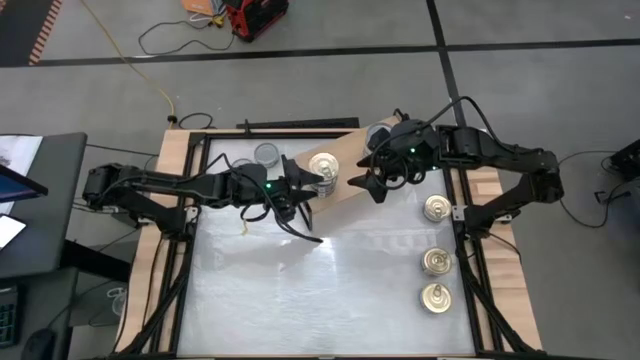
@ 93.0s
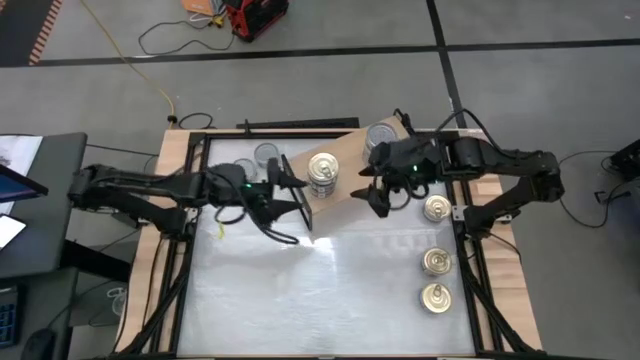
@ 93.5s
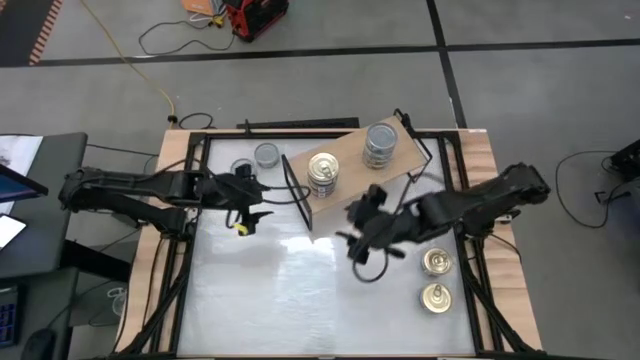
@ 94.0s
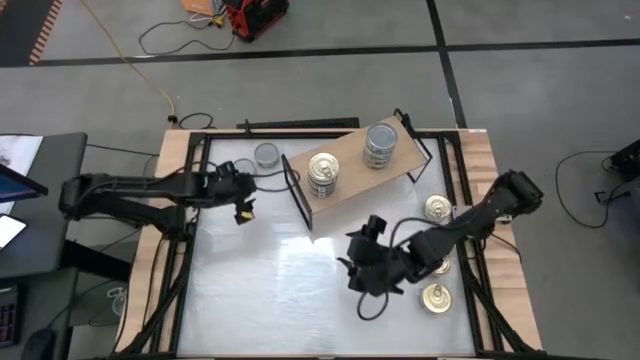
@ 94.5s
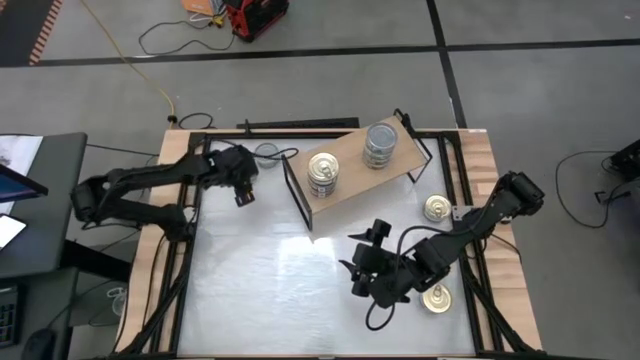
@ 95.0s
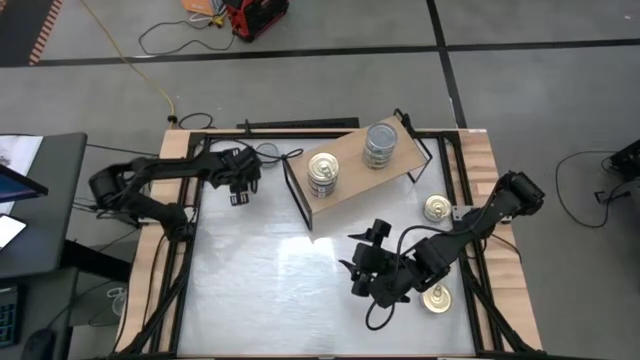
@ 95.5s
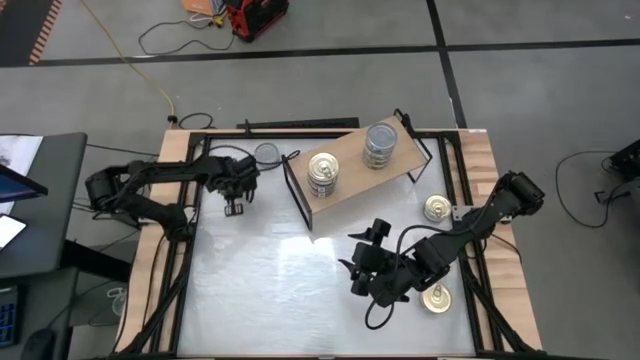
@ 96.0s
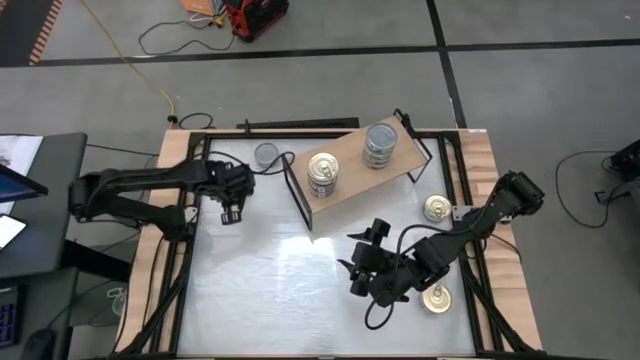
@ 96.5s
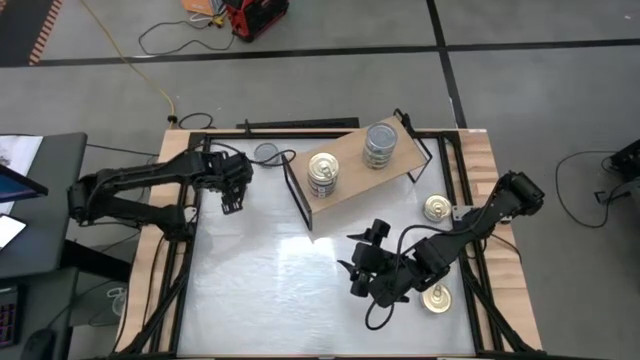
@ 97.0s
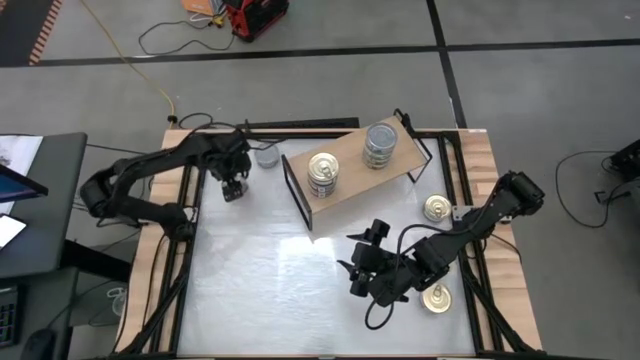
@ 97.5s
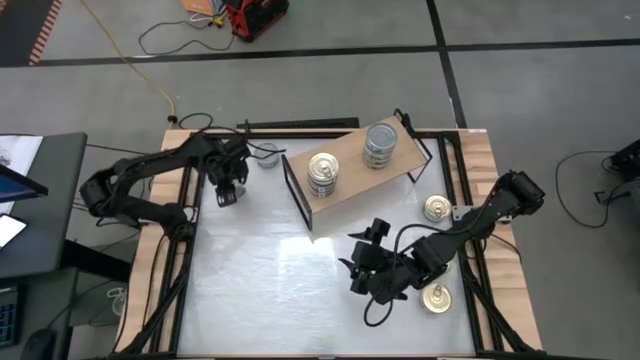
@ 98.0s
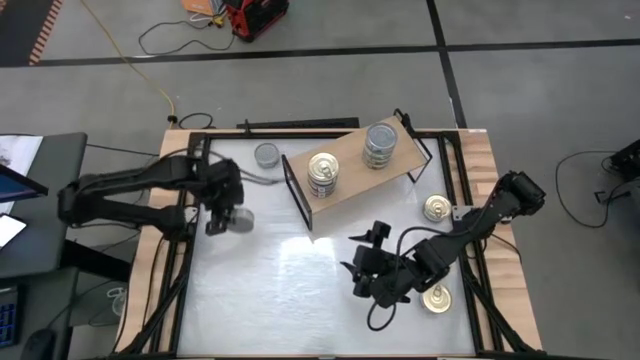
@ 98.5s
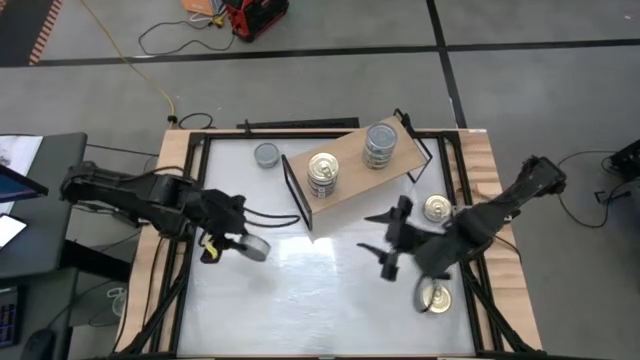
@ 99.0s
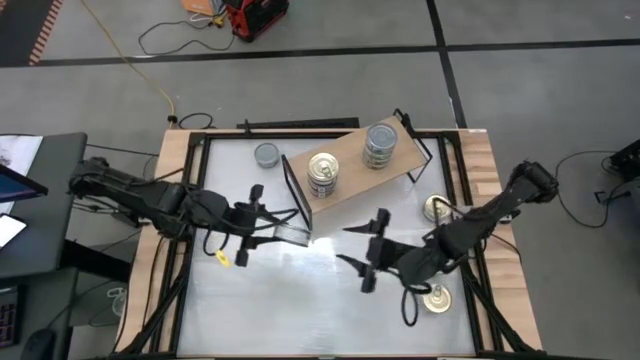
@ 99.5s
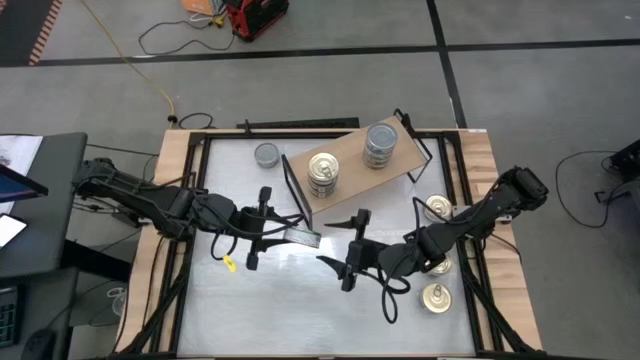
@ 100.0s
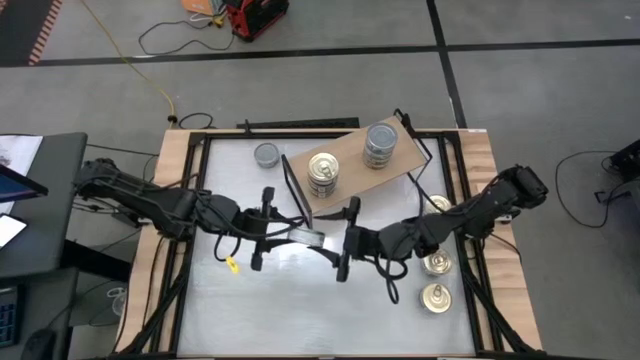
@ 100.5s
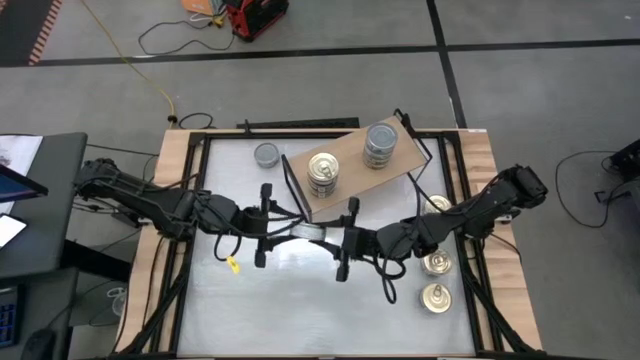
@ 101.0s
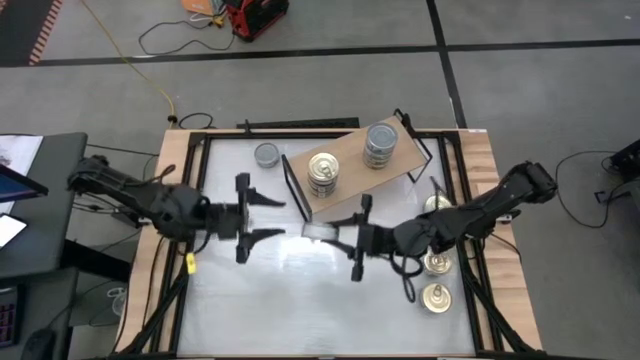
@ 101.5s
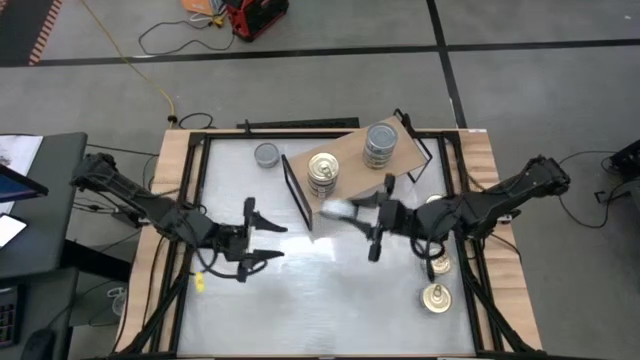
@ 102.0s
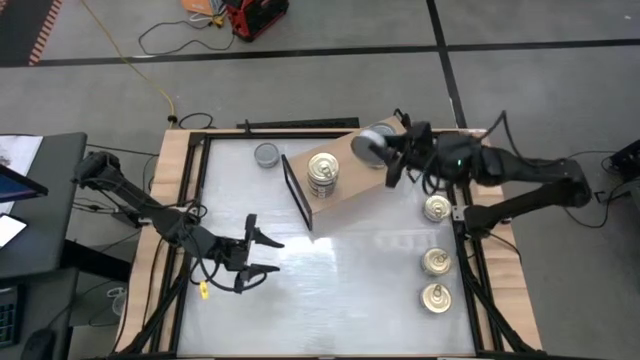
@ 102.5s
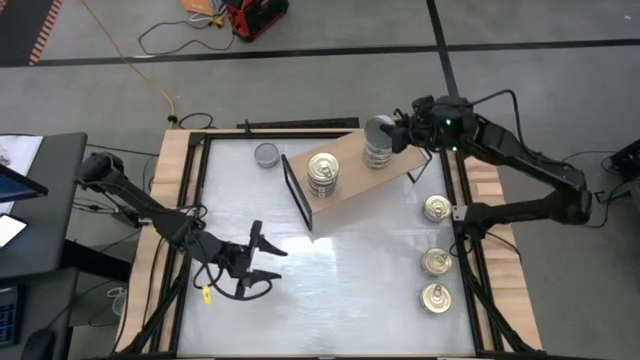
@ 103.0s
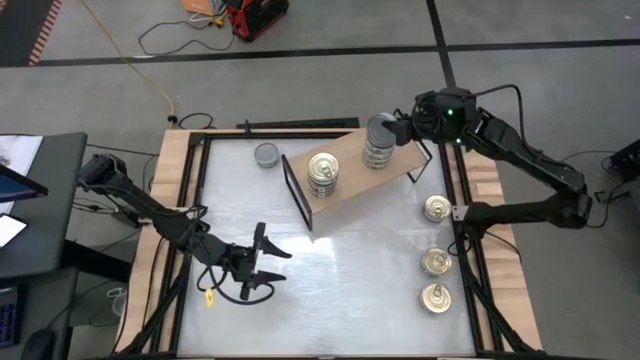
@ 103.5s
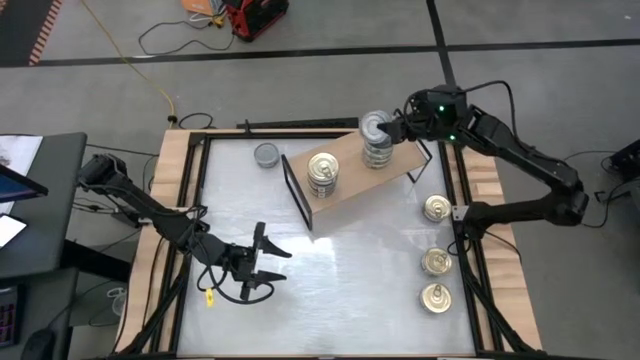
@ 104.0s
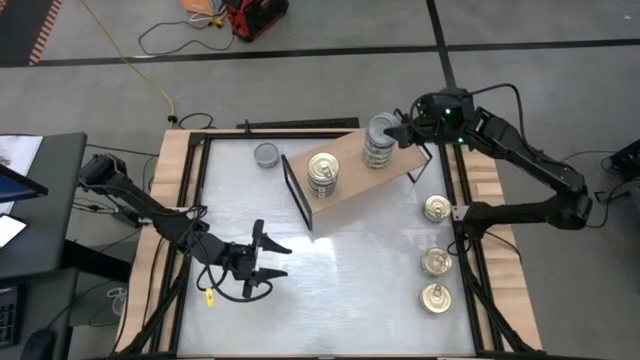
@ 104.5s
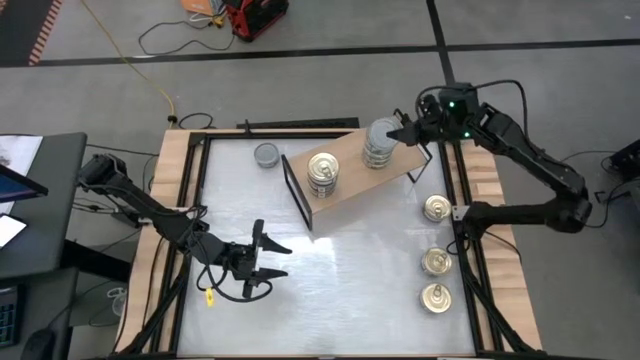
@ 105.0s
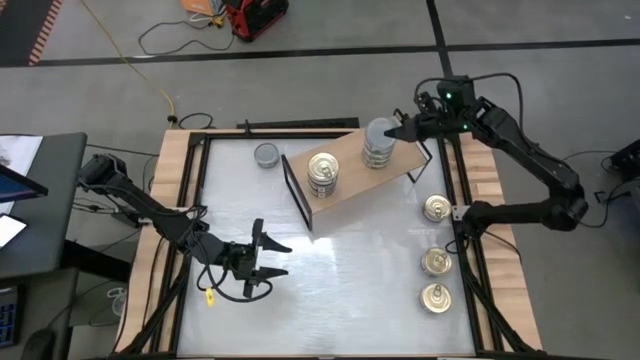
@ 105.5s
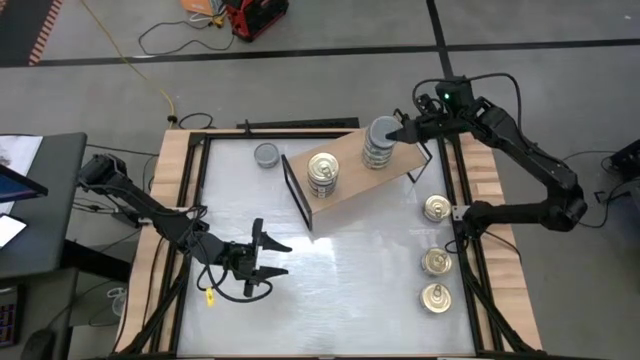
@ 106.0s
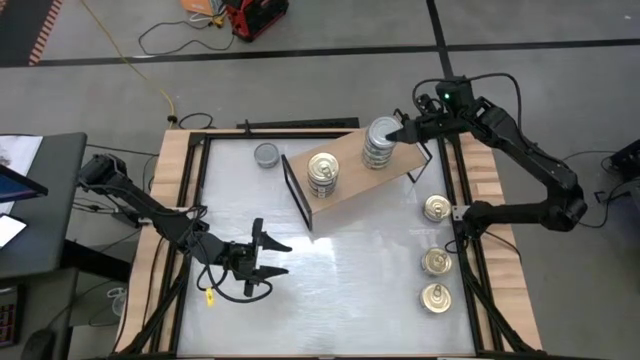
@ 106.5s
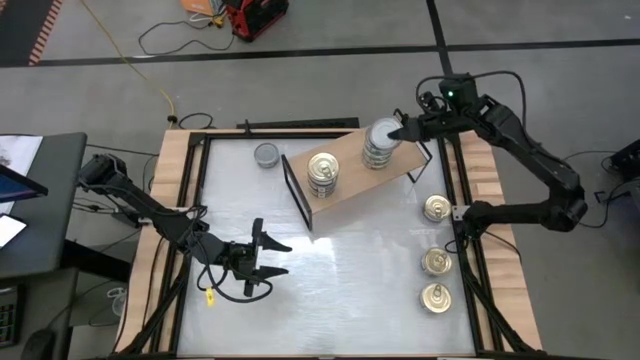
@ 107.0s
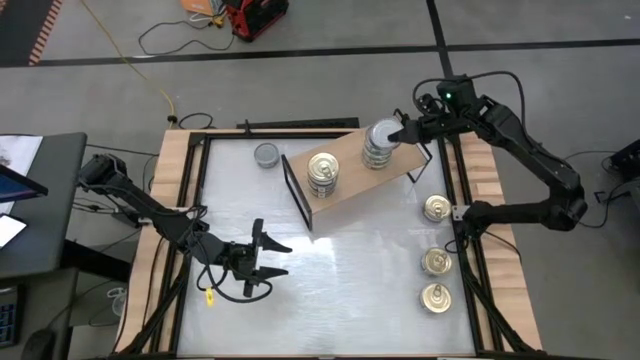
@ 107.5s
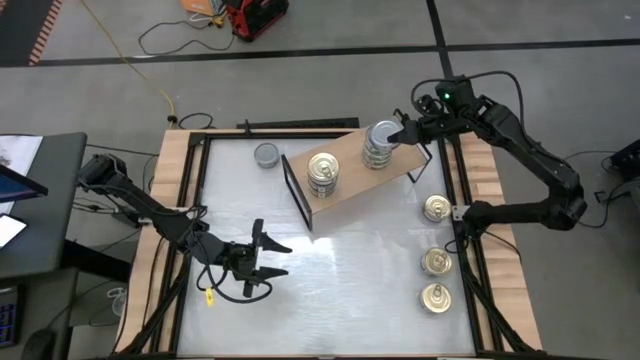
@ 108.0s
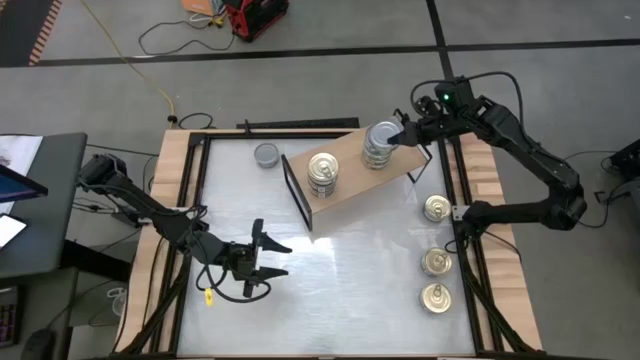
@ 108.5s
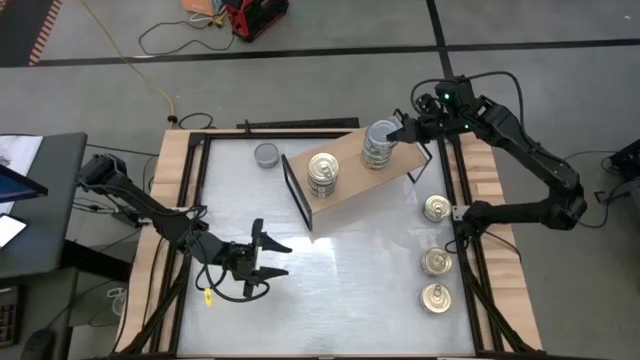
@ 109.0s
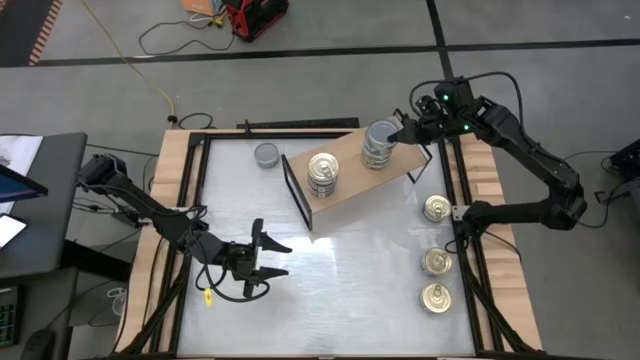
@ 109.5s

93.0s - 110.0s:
Task: Stack canned seafood by type on shelf
Stack the green tuna can on top of the green tuna can

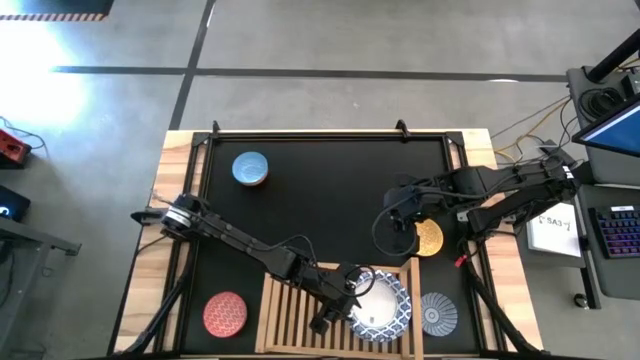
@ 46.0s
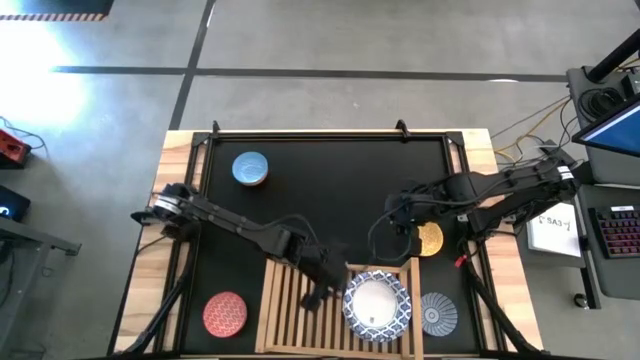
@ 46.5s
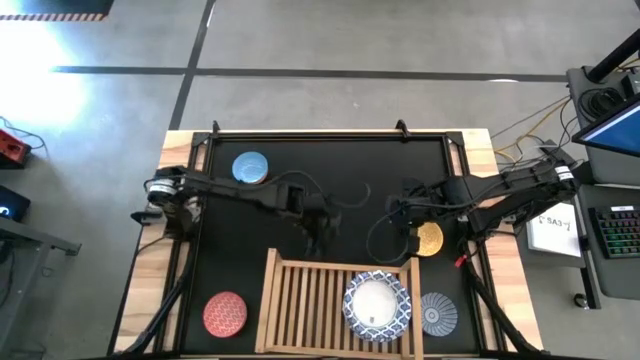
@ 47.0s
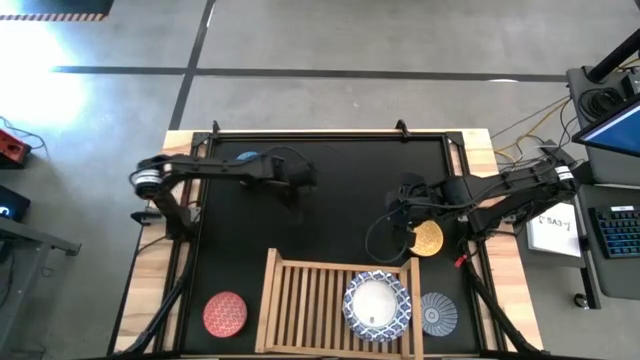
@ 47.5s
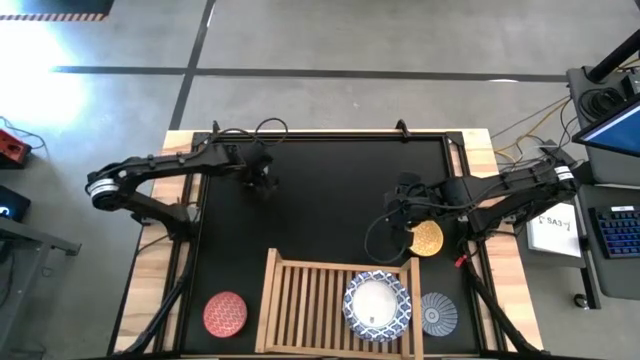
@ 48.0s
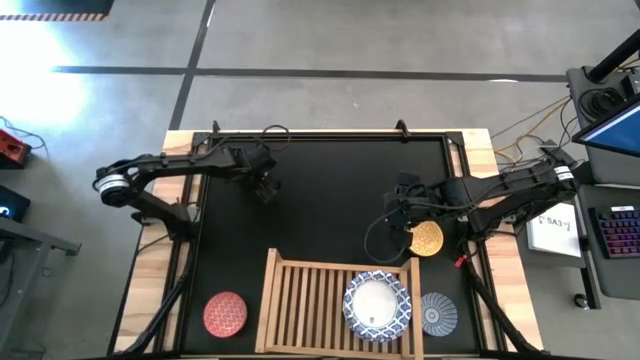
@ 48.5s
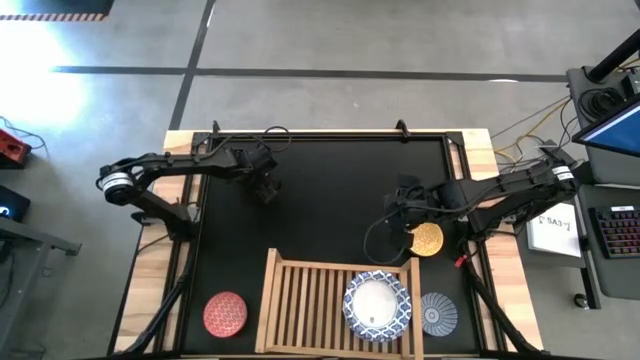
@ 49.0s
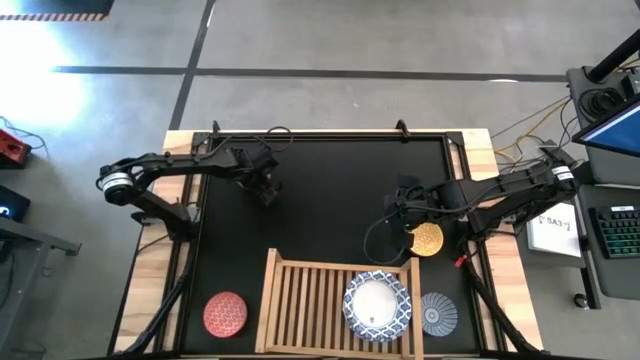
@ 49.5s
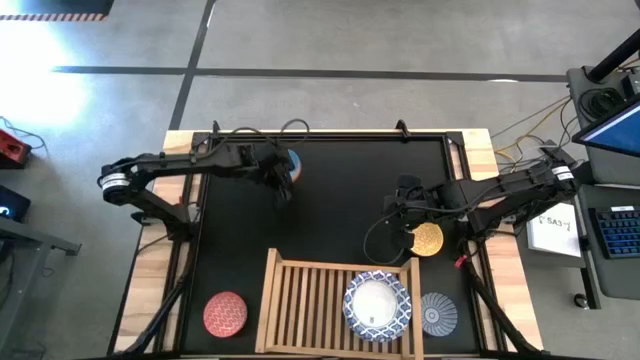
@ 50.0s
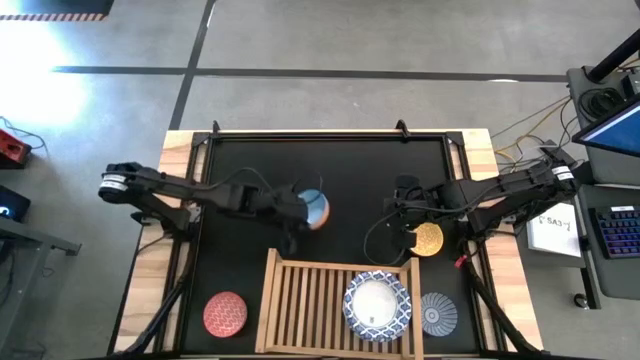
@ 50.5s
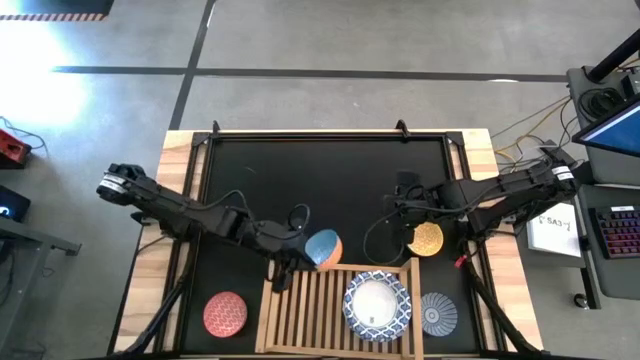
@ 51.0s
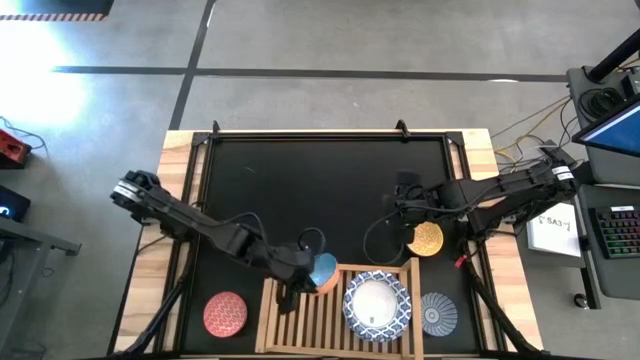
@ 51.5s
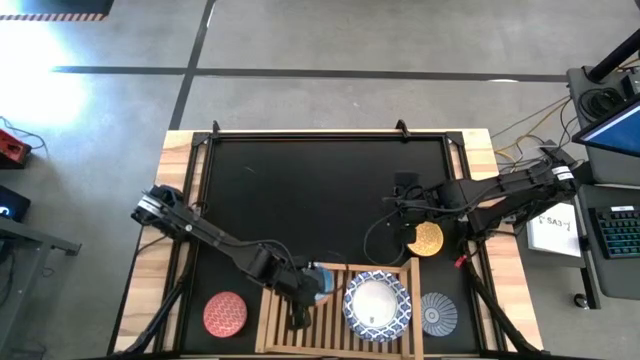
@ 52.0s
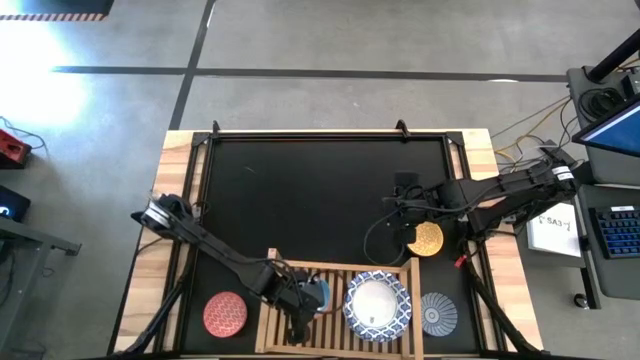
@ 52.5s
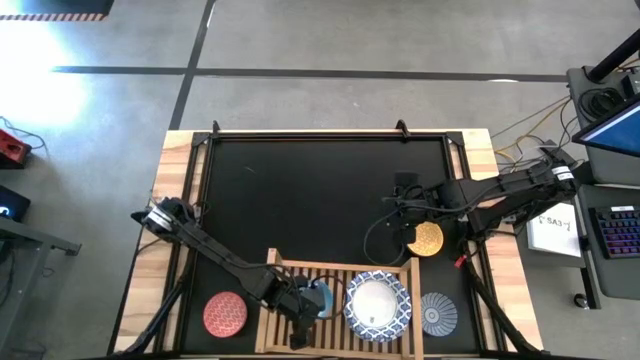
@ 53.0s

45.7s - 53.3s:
Task: Place and stack bowls onto a shelf
Put the blue patterned bowl on the shelf
